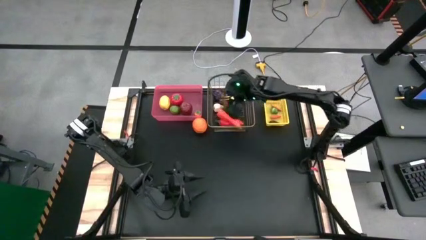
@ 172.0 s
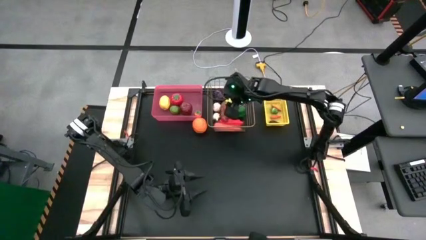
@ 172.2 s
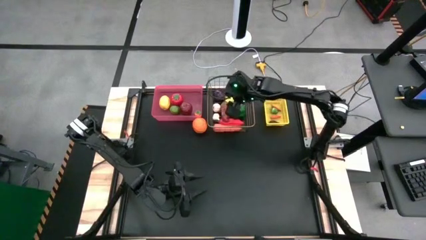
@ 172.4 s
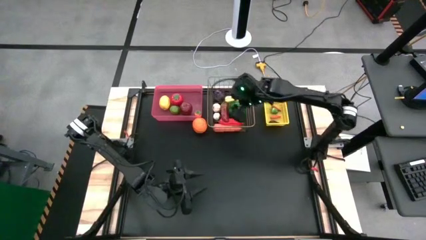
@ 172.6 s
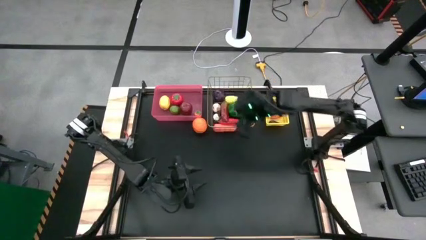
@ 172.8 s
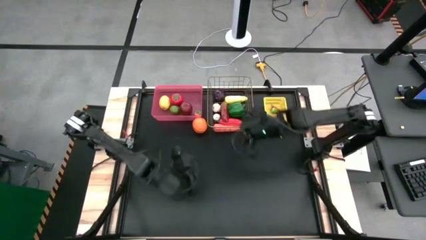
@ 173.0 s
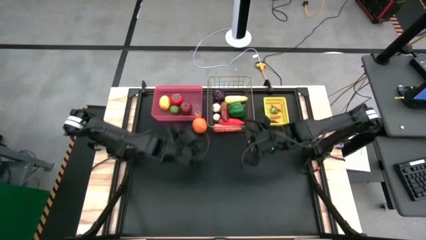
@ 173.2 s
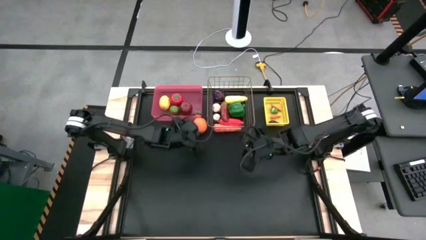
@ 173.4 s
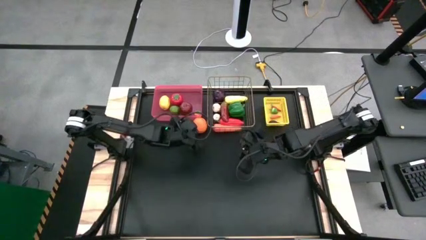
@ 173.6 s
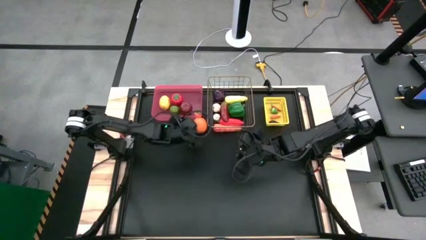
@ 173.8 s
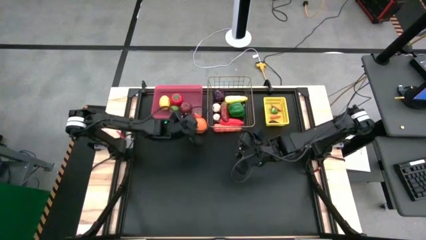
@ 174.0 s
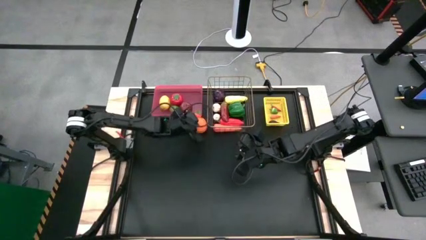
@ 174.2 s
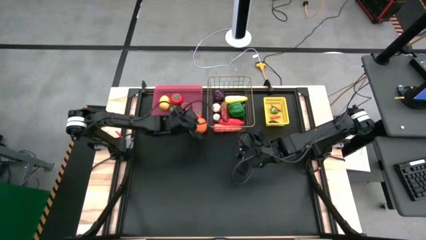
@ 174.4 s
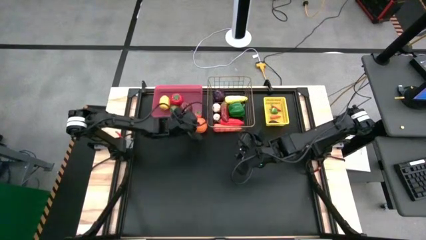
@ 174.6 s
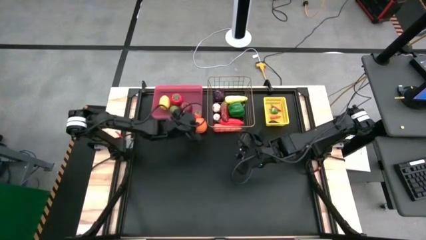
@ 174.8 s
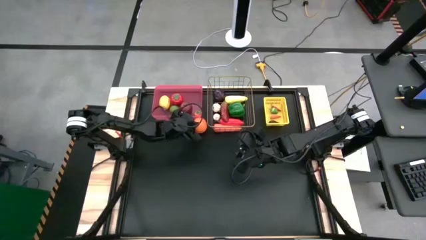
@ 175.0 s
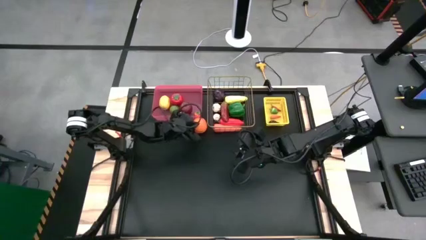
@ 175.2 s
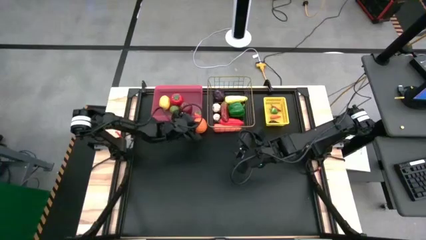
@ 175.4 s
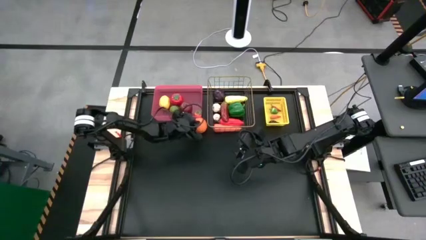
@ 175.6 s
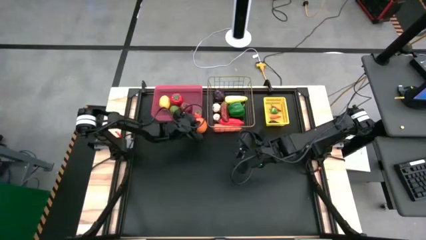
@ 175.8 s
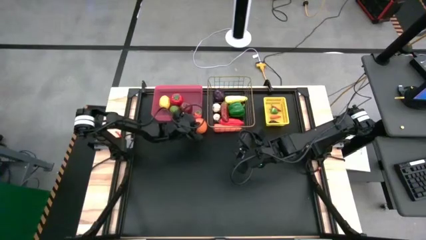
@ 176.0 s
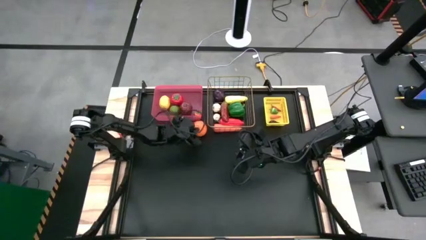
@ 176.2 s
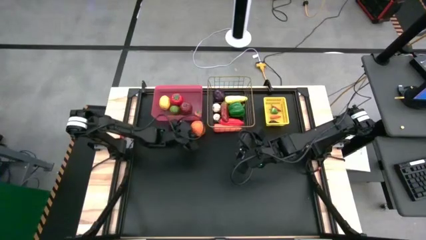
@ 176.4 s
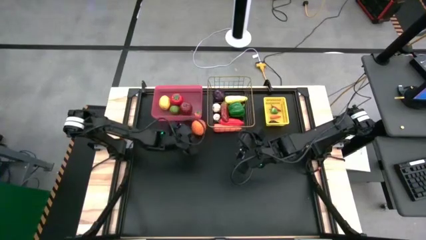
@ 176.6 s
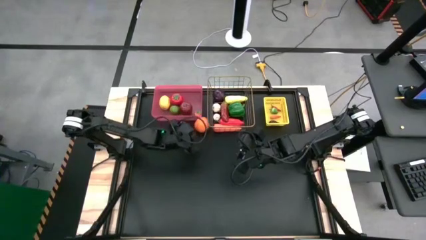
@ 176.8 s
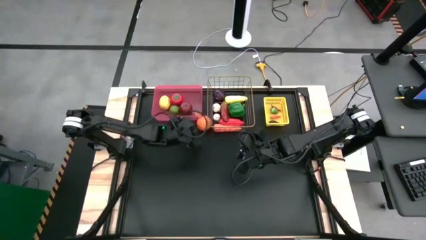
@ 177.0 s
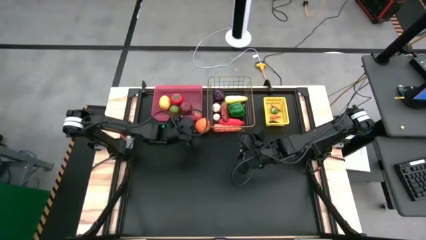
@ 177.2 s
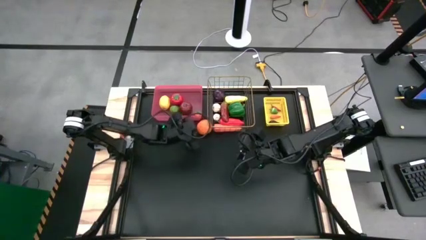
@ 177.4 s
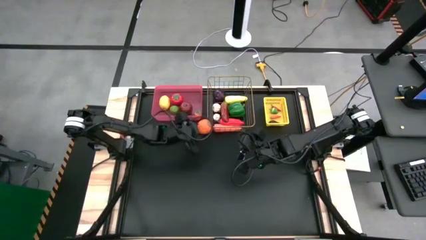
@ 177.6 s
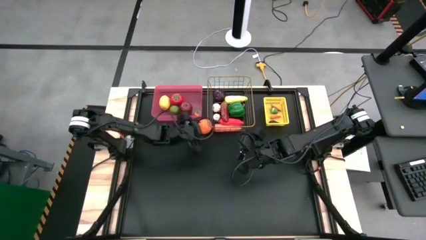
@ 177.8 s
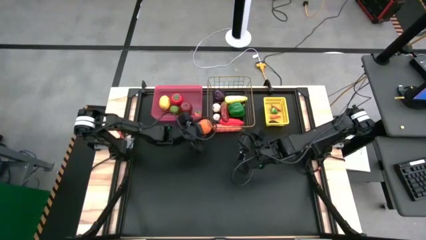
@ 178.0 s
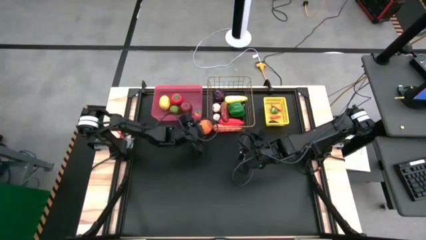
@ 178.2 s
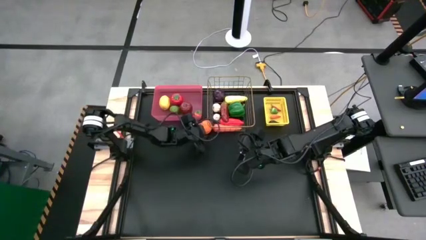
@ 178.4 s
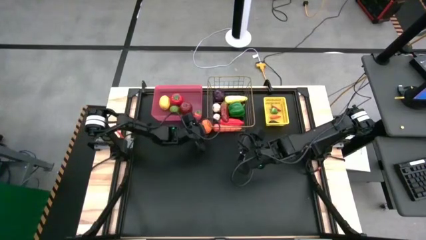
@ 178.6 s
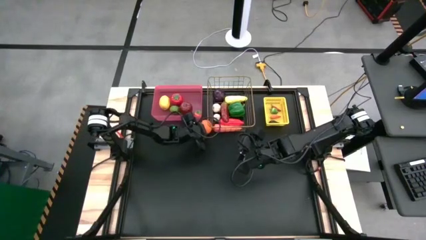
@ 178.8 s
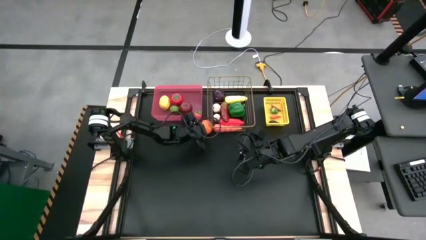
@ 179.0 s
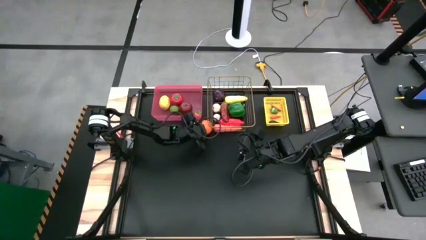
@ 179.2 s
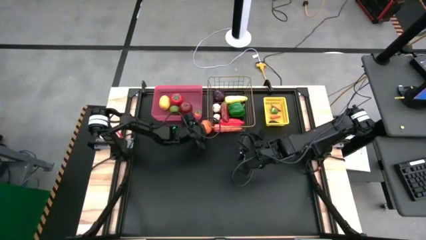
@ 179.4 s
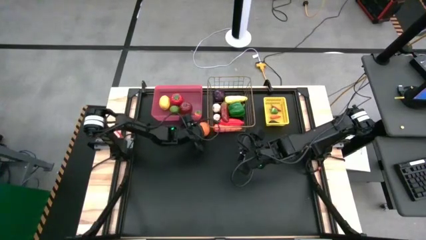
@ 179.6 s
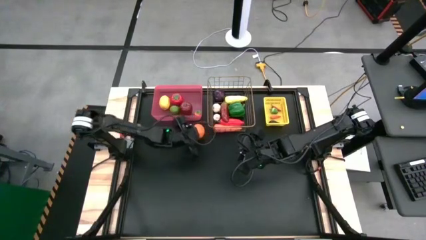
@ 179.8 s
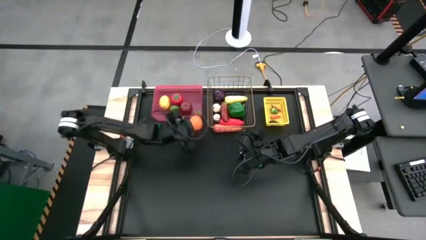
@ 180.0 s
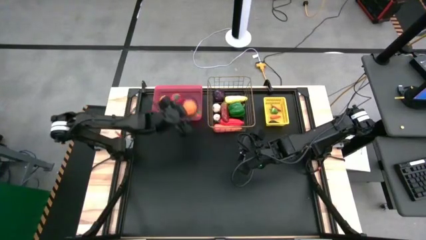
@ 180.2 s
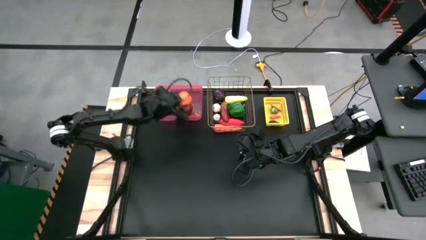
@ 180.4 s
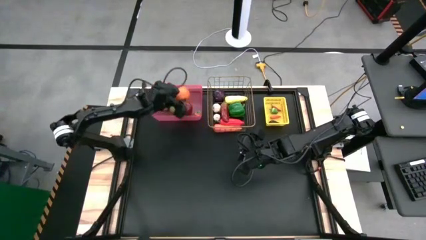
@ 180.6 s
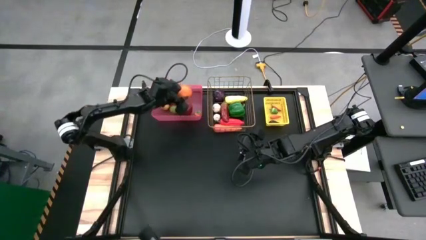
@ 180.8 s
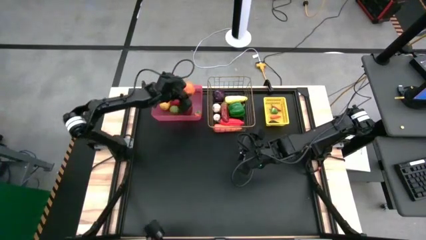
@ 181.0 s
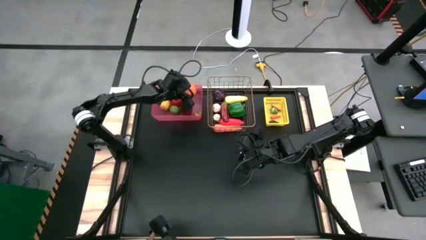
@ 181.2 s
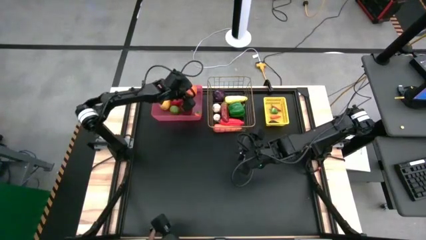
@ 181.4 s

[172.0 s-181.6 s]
Task: Sort produce into baskets
Put the orange into the red bin

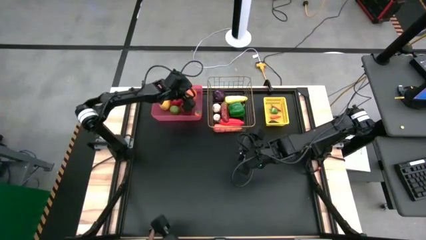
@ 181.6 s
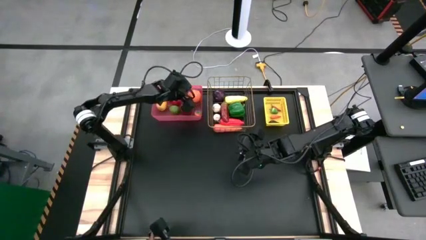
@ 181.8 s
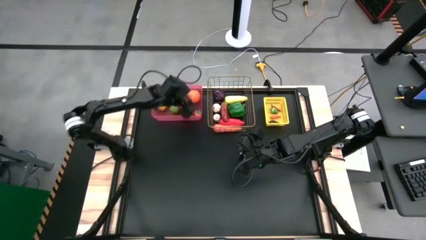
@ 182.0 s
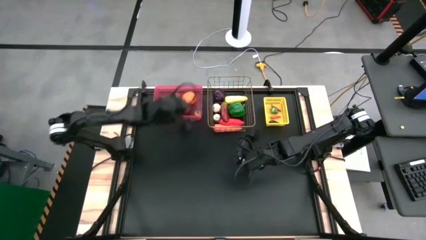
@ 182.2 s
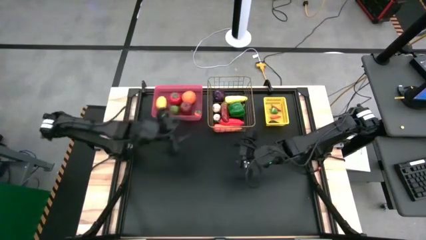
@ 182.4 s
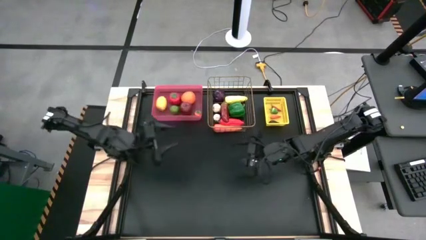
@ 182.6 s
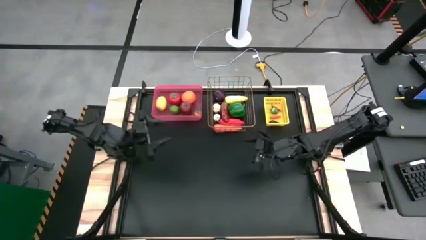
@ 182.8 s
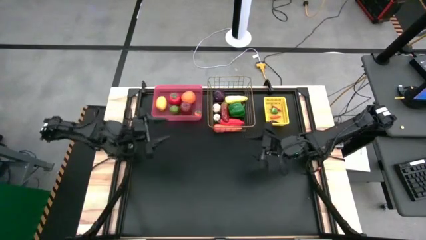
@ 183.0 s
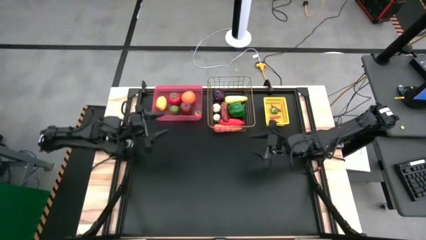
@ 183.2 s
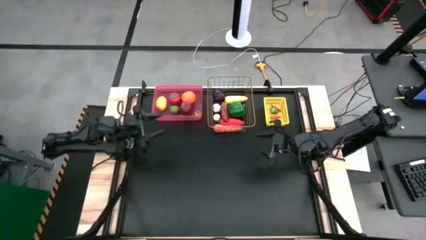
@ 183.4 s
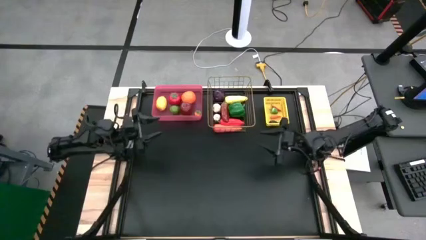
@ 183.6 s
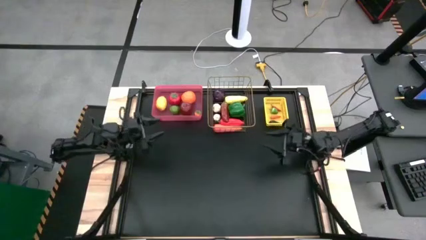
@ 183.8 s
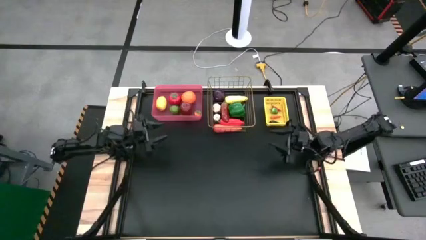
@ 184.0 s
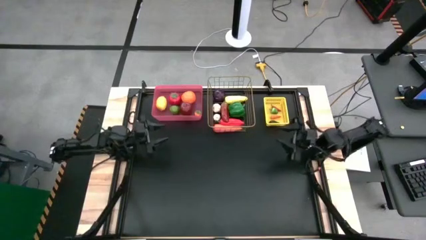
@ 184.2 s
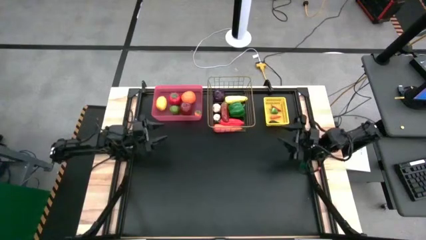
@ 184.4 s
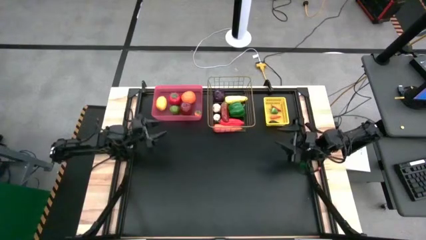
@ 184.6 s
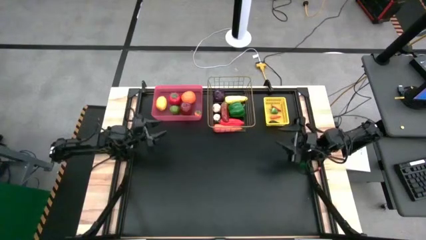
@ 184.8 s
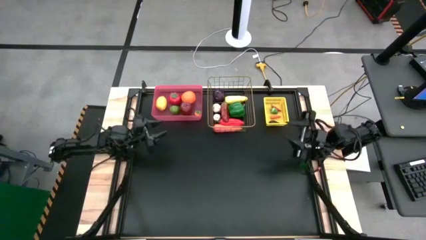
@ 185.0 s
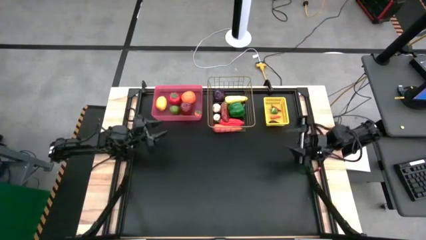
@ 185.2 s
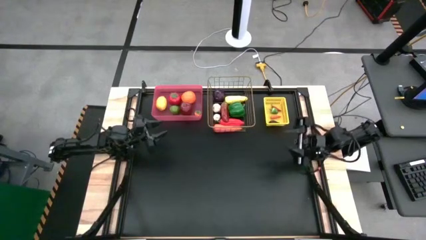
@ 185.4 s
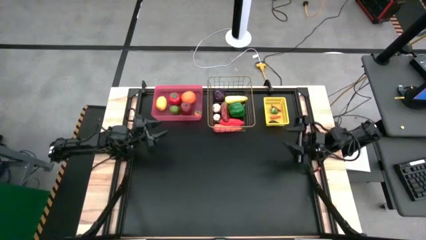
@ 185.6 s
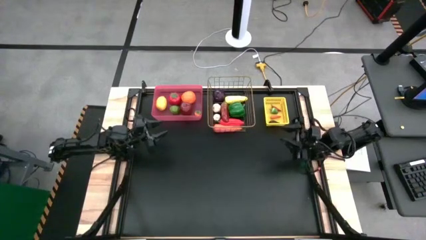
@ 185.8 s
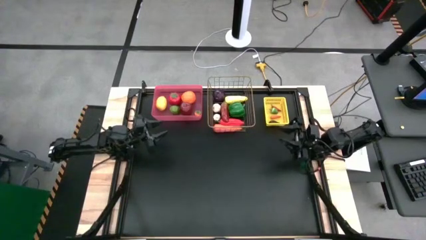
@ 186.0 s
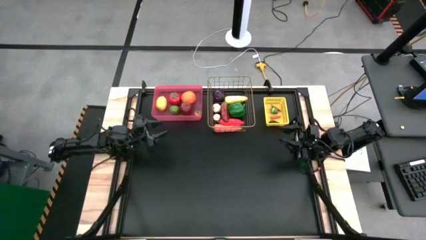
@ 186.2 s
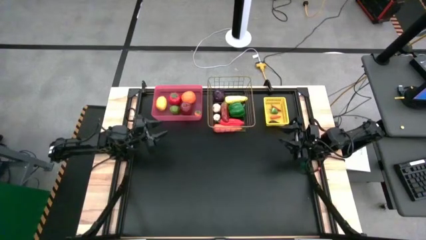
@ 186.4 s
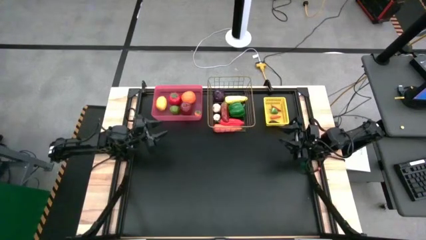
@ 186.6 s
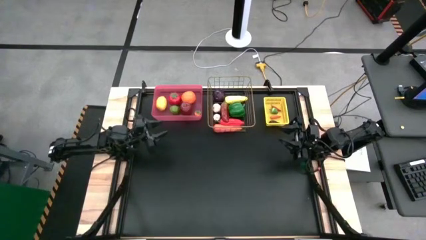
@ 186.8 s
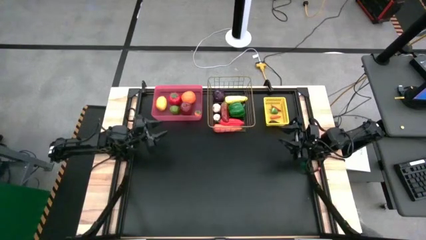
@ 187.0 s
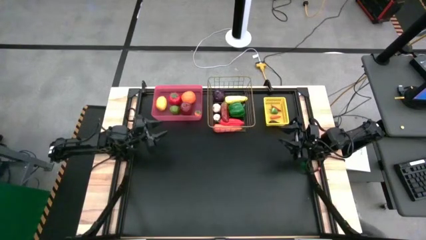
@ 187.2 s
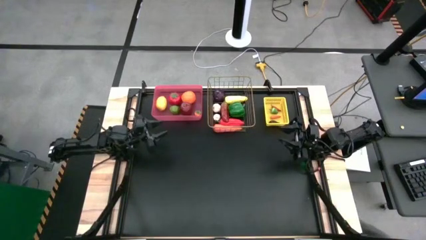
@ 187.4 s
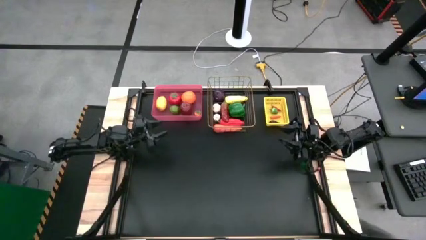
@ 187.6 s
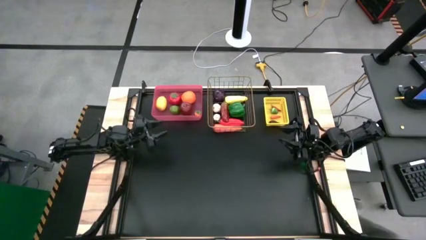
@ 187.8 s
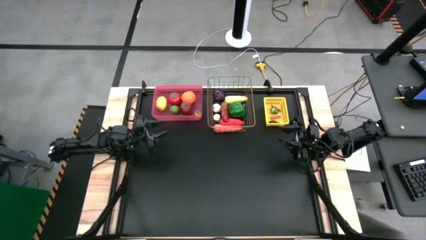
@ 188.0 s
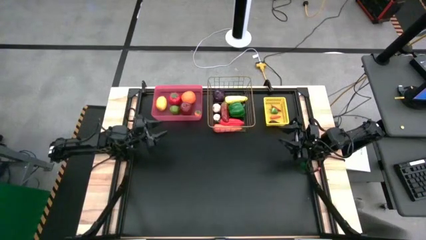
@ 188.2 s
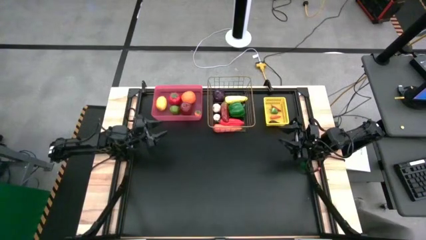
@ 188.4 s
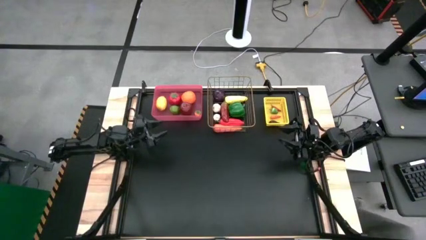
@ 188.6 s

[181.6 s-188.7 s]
Return to Home Position
